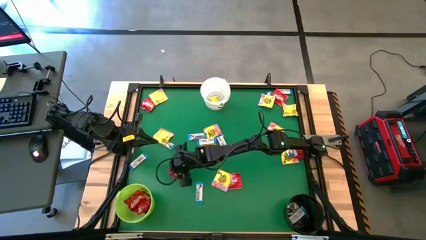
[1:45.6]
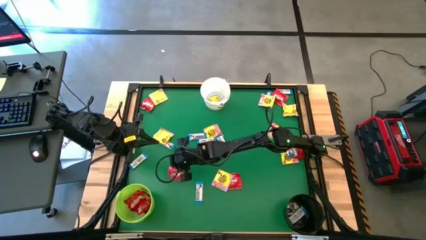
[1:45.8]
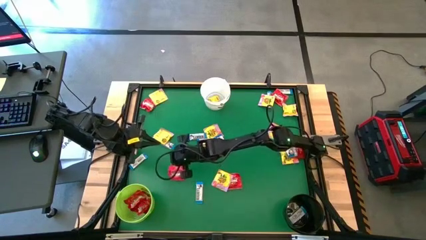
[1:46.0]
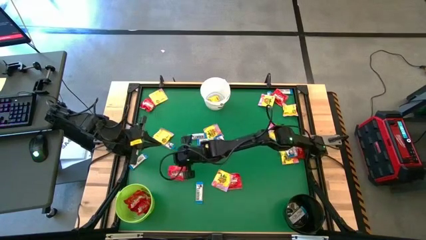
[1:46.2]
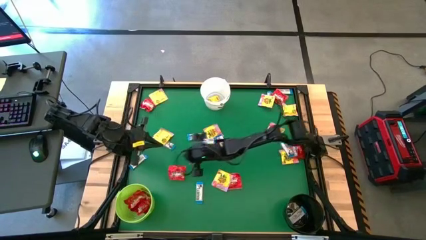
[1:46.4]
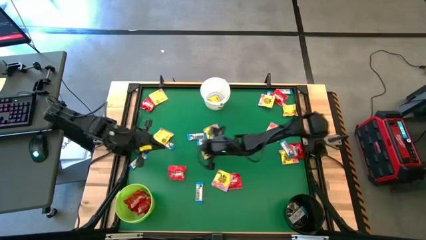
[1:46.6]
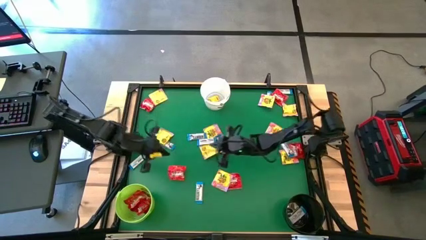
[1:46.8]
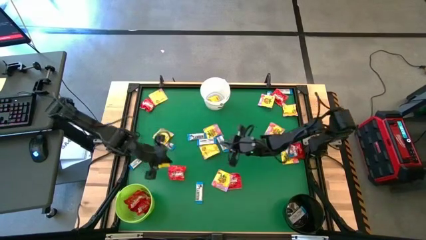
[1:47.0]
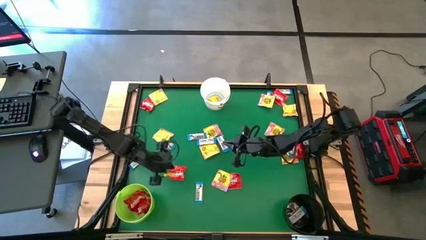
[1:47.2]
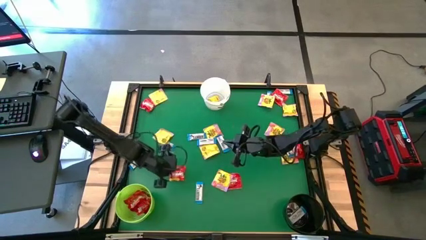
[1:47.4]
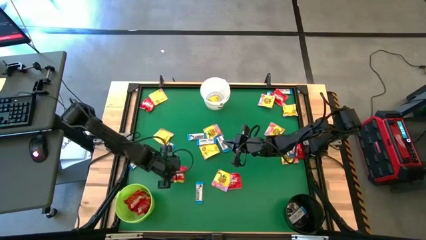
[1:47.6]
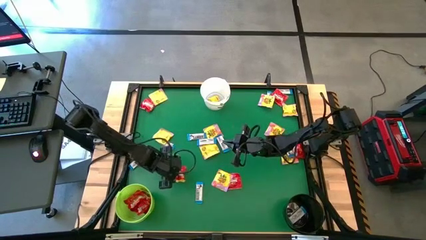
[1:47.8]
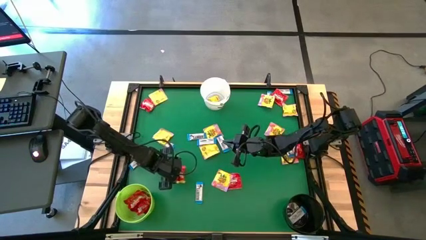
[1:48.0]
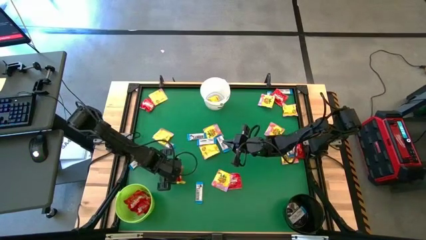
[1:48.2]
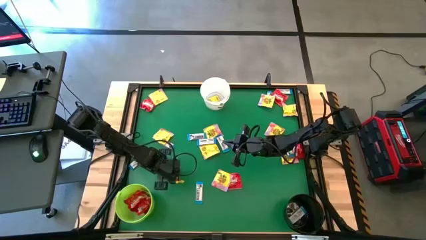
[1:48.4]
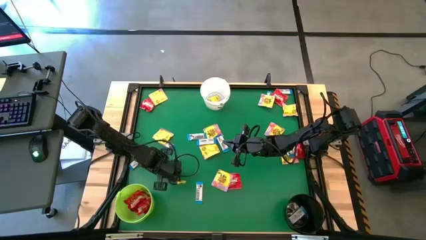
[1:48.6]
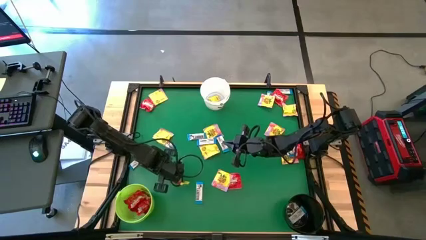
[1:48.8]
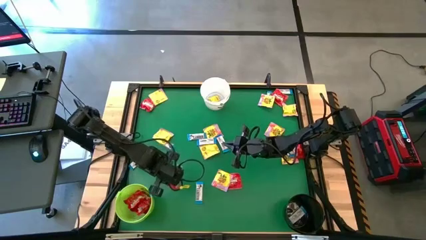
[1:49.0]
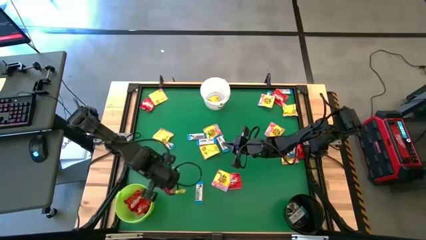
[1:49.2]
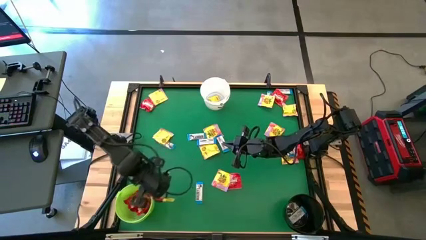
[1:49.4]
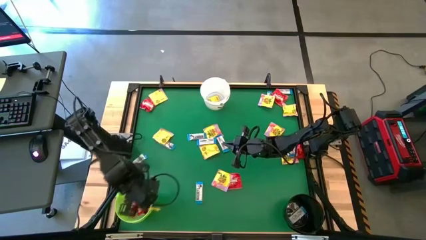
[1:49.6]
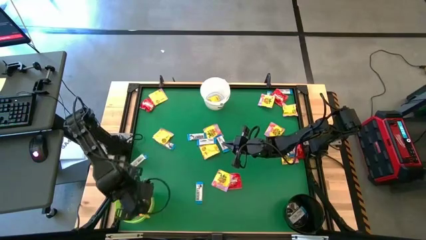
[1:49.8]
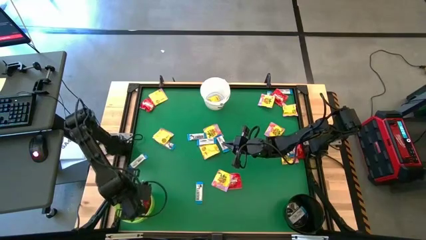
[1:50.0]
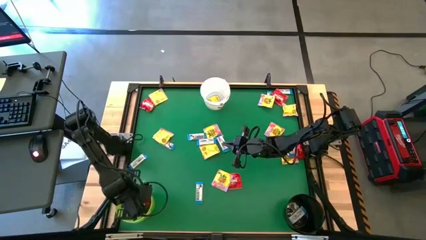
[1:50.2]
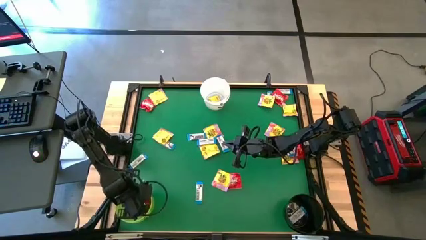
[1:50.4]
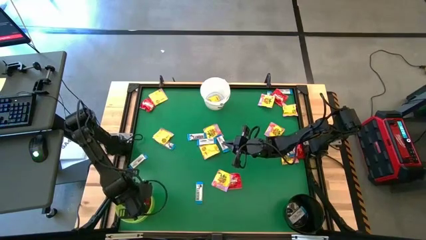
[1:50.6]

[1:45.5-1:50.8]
Task: Sort candy by brand, put in halloween buckets
Put the red candy into the green bucket

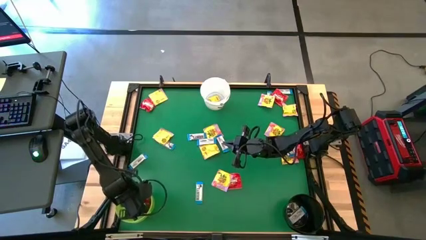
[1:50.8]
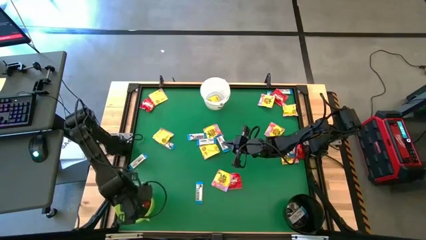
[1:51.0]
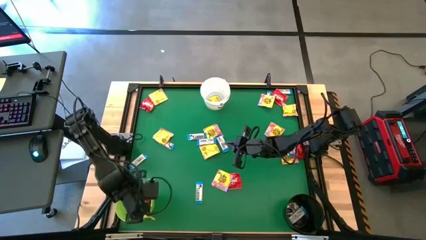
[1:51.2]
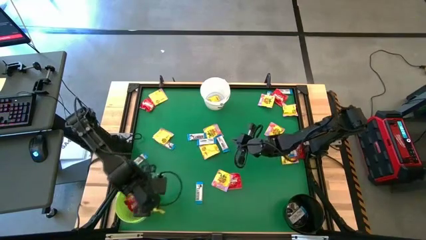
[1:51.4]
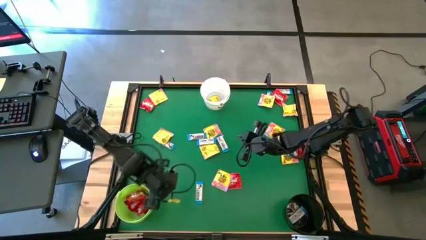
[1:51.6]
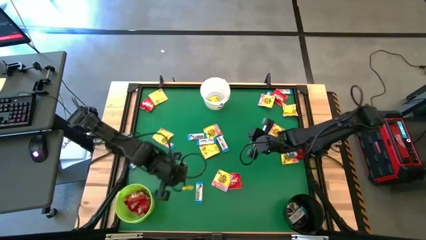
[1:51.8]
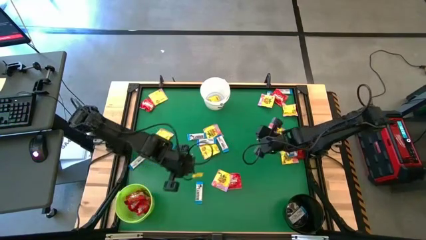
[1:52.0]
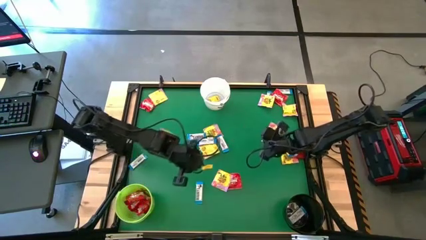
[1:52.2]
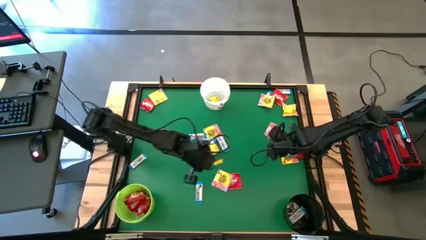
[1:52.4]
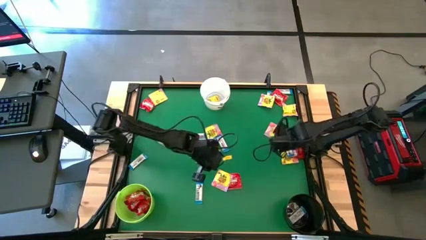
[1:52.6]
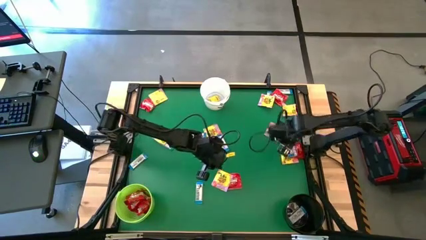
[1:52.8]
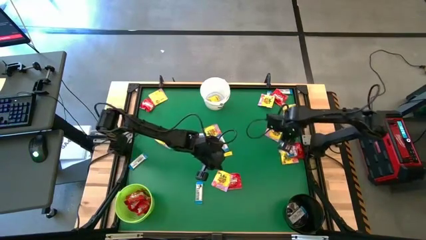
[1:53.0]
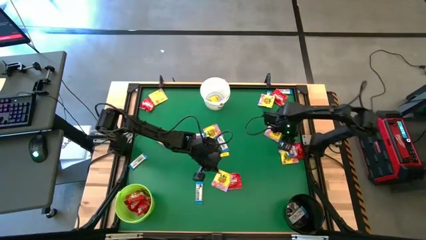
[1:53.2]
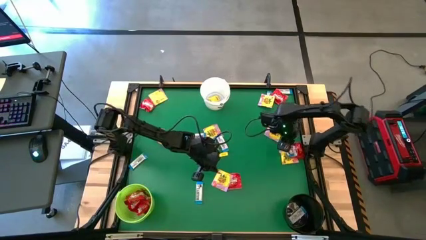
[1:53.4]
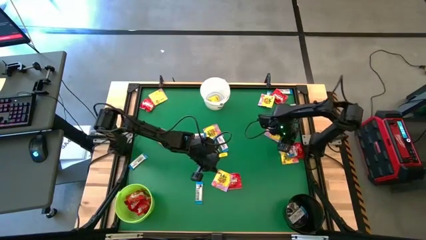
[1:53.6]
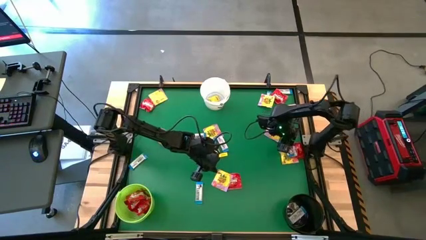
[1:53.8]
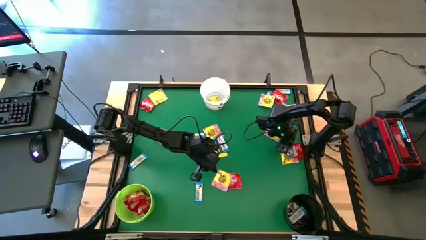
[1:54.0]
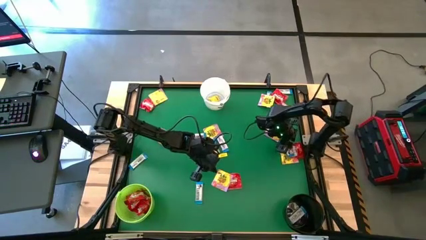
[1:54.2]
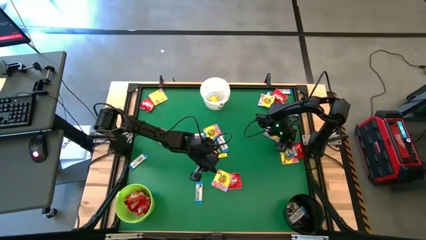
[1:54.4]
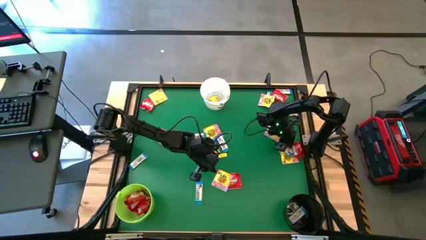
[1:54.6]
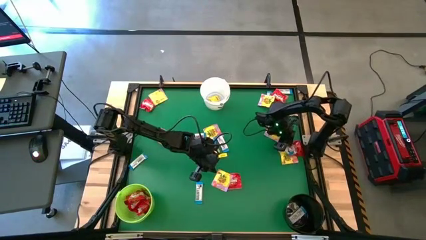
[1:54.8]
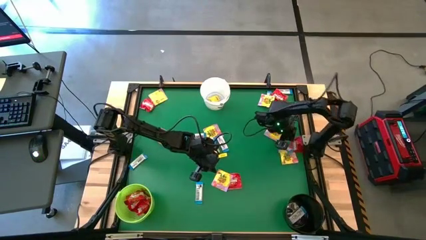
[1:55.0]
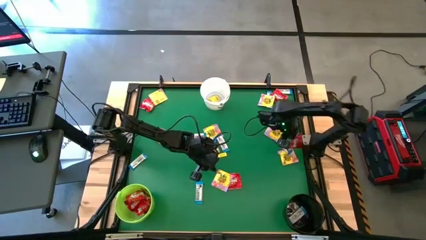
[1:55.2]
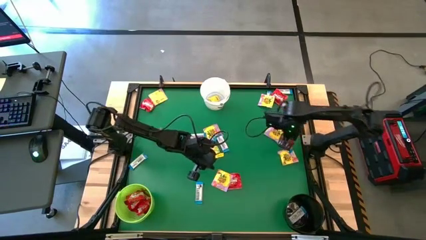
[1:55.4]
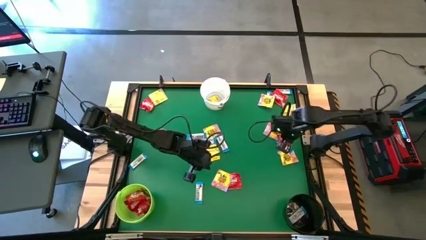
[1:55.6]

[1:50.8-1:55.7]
Put the red candy into the green bucket

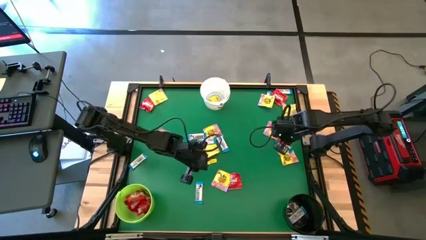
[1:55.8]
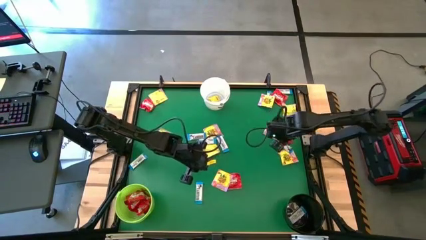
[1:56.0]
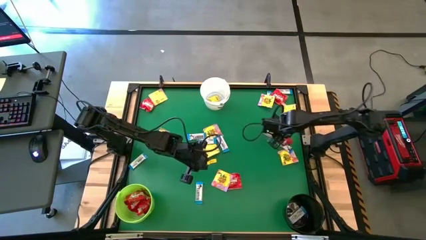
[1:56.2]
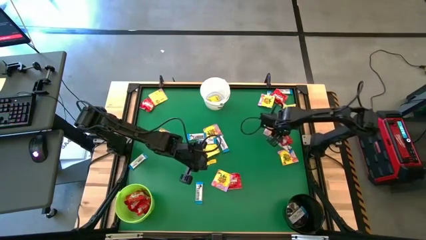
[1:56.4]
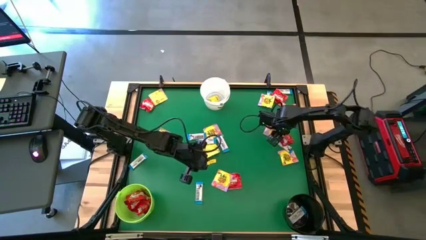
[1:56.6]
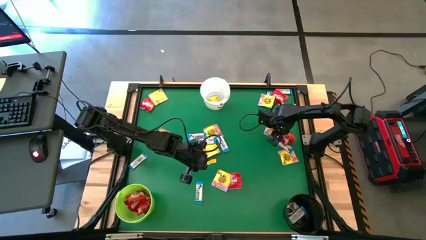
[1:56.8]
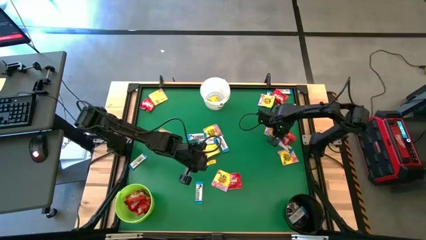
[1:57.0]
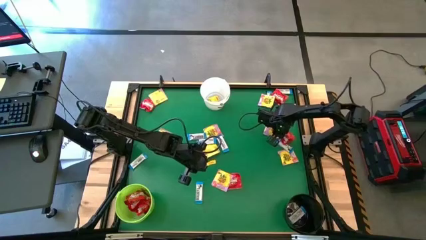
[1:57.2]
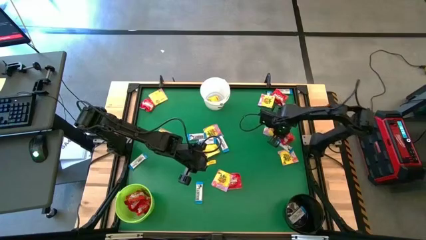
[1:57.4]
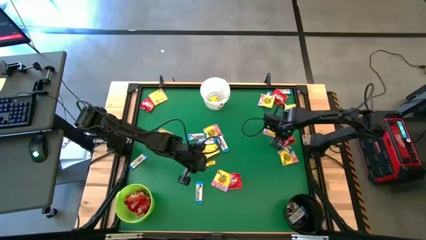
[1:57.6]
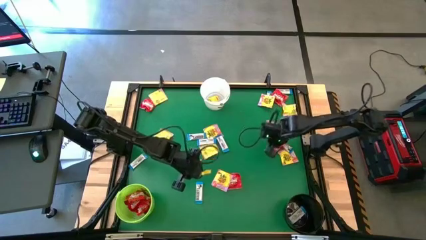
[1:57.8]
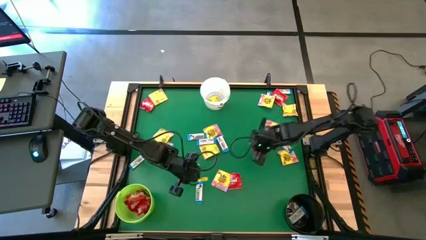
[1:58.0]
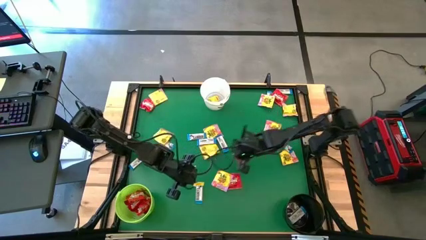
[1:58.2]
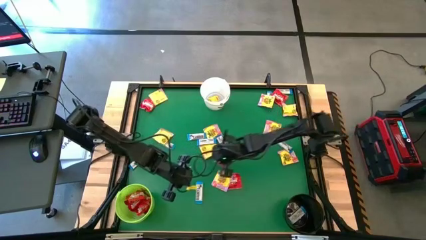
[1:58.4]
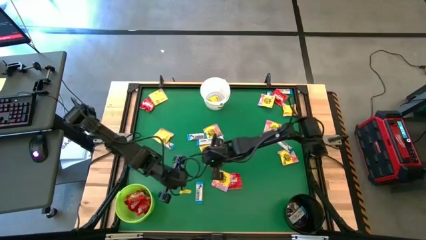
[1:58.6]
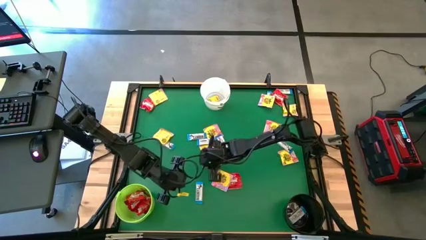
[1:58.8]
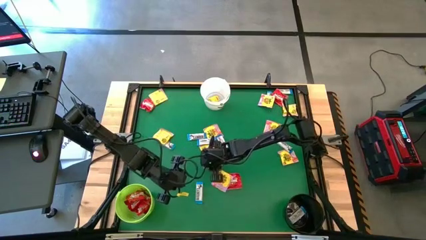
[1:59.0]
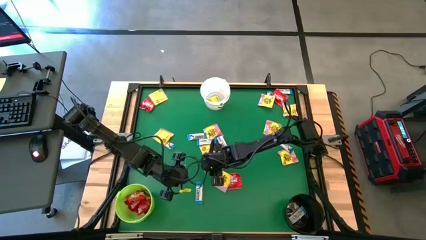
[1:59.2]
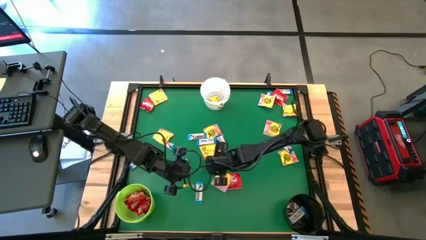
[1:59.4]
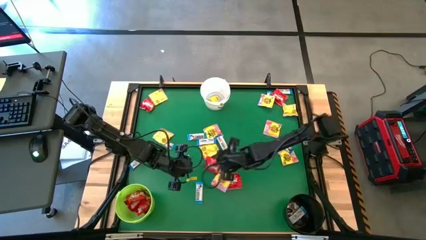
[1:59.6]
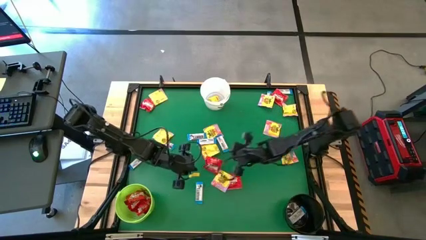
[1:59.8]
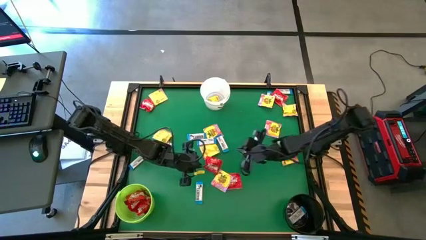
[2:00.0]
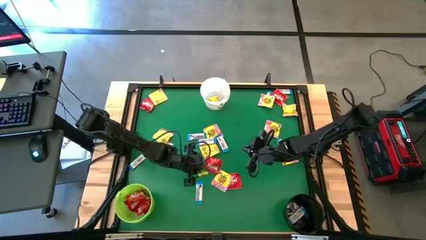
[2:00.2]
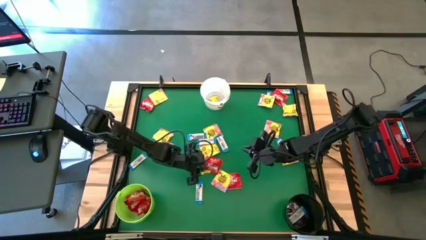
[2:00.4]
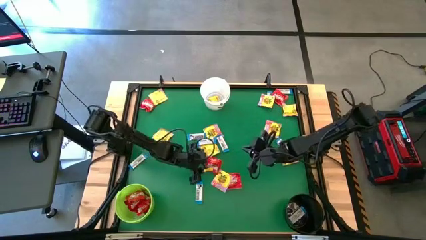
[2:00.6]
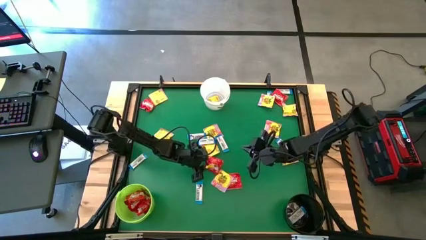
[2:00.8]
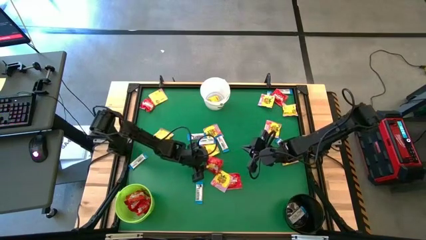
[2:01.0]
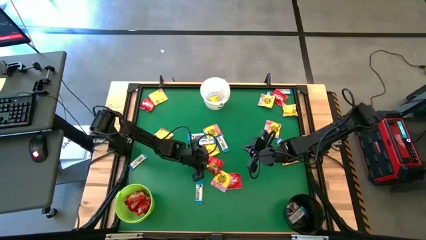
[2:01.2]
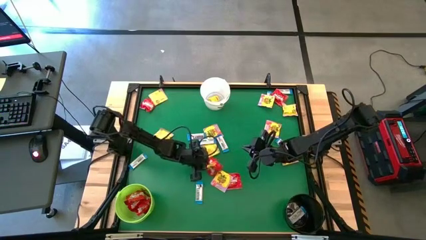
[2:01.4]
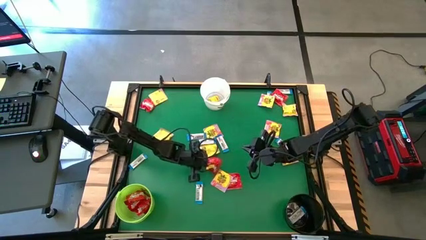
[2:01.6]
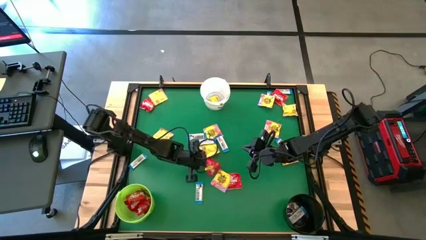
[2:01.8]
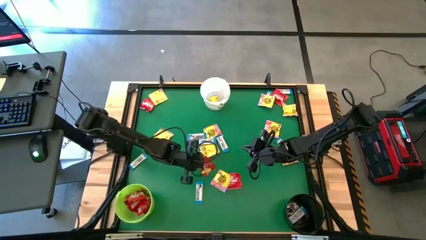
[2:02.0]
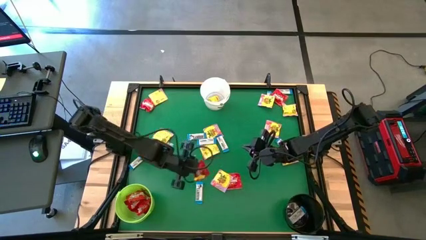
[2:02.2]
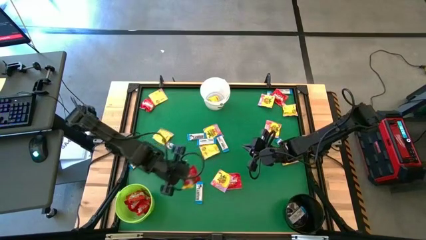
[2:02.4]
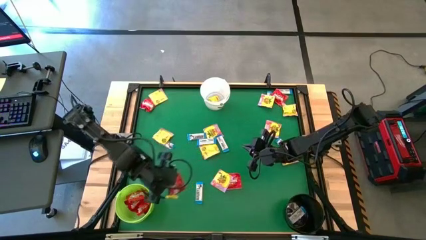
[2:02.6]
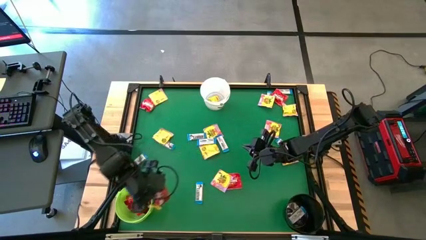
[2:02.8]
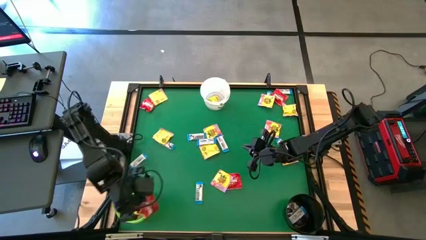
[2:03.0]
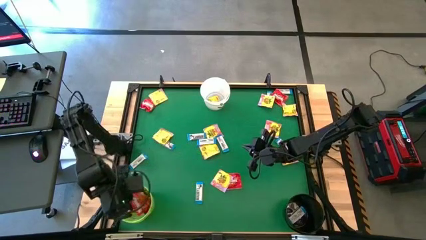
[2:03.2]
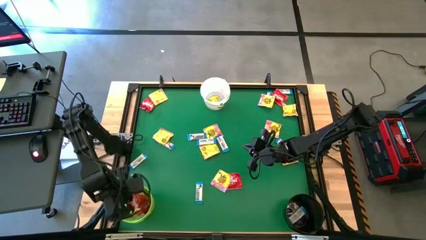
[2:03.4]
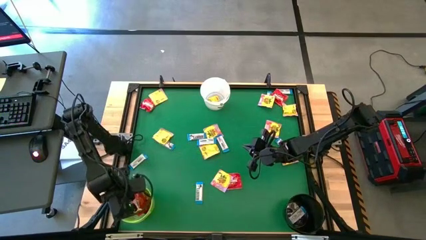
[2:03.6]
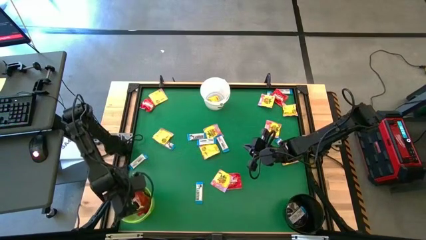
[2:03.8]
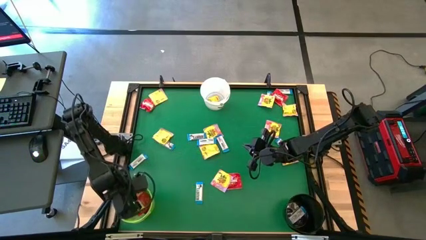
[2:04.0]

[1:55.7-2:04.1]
Put the red candy into the green bucket
